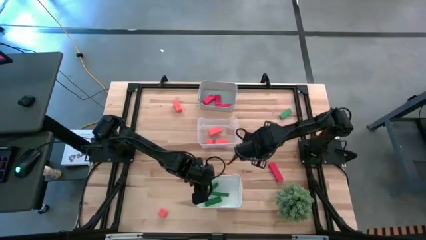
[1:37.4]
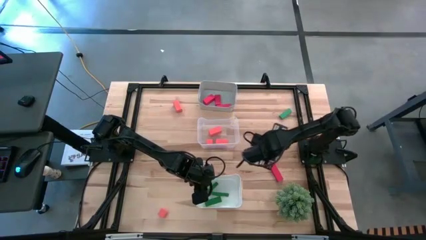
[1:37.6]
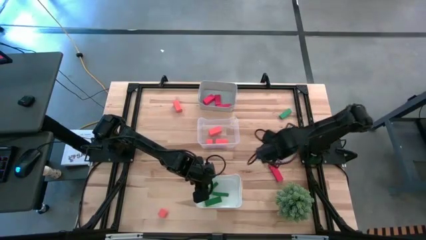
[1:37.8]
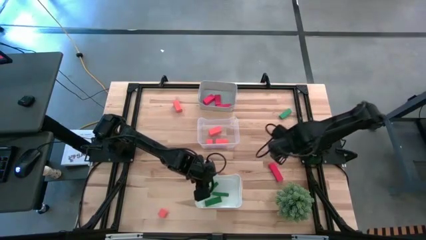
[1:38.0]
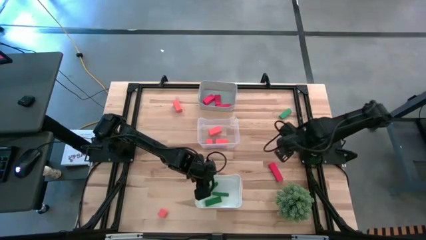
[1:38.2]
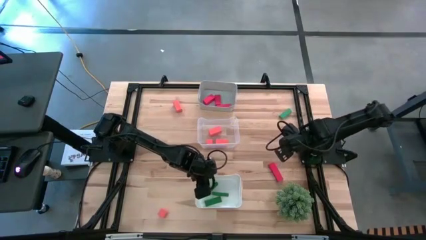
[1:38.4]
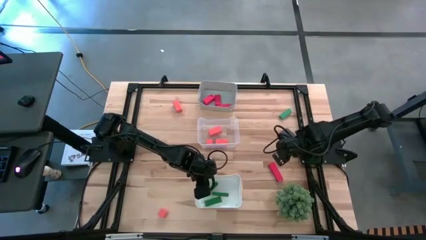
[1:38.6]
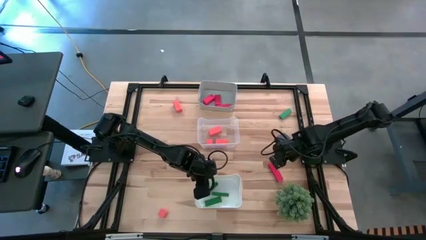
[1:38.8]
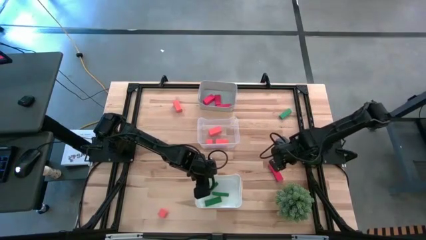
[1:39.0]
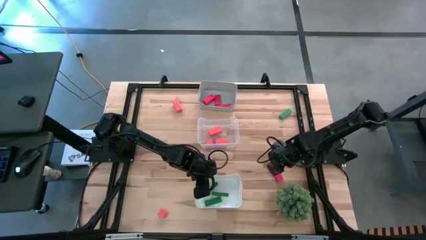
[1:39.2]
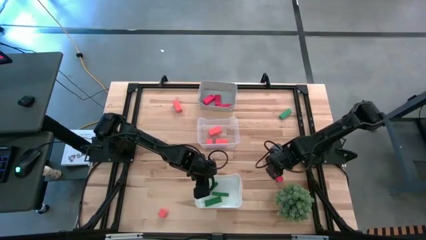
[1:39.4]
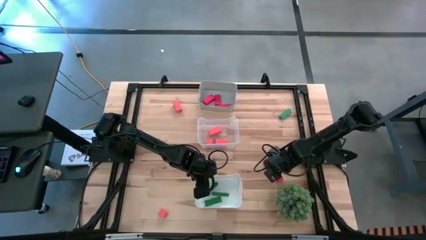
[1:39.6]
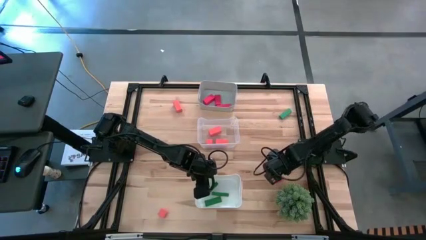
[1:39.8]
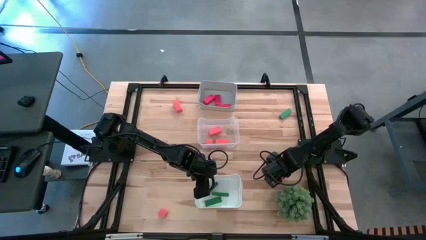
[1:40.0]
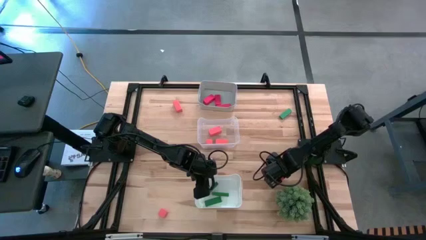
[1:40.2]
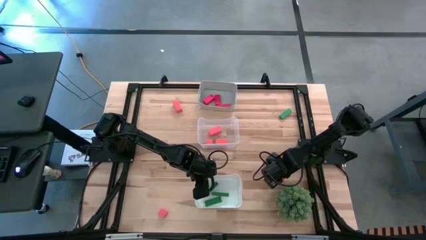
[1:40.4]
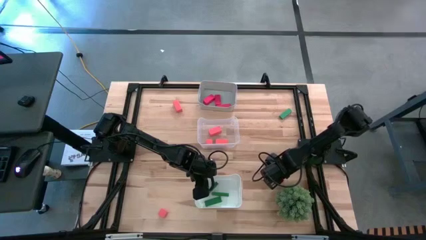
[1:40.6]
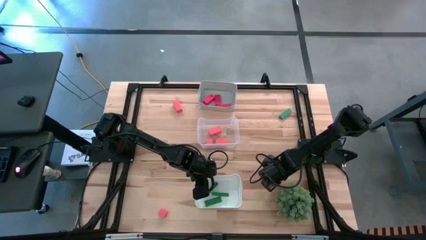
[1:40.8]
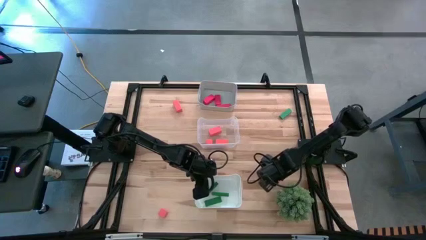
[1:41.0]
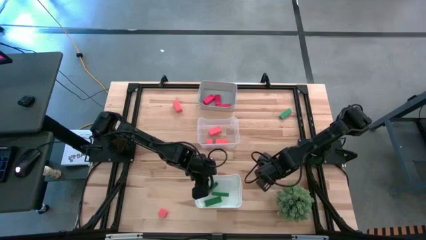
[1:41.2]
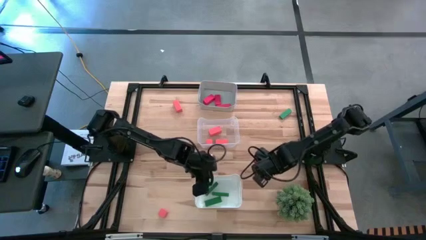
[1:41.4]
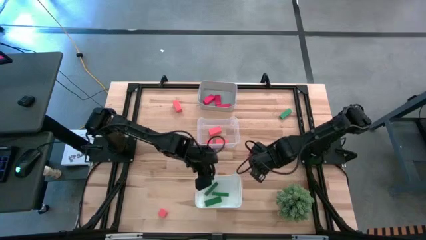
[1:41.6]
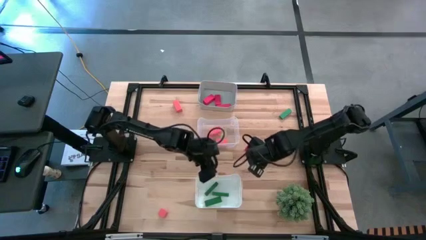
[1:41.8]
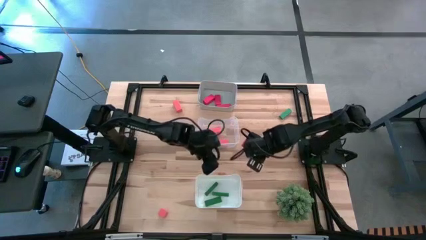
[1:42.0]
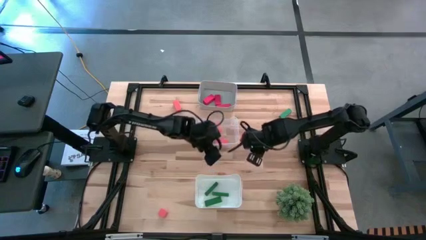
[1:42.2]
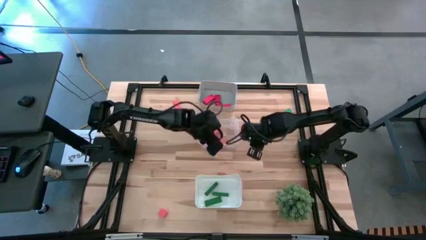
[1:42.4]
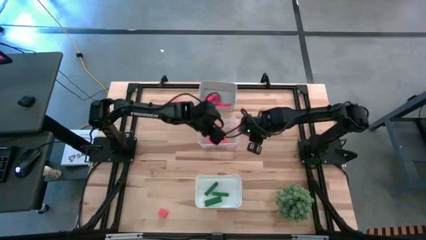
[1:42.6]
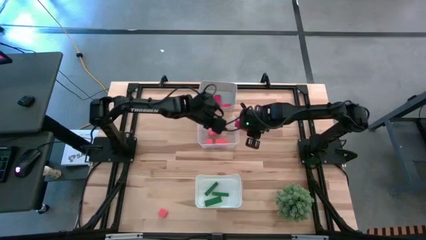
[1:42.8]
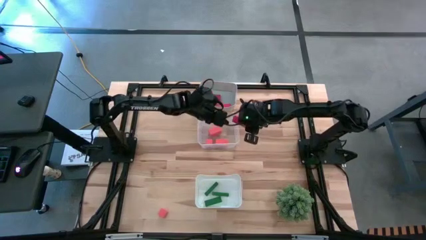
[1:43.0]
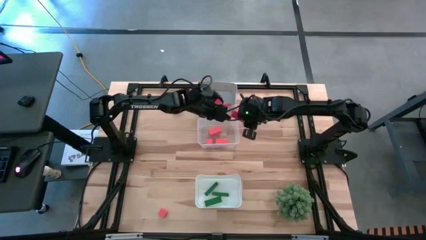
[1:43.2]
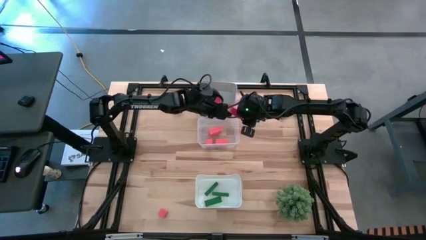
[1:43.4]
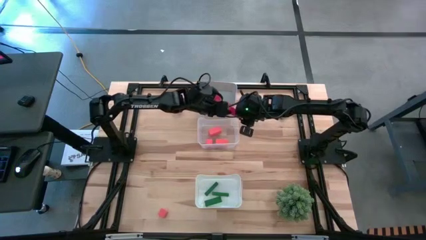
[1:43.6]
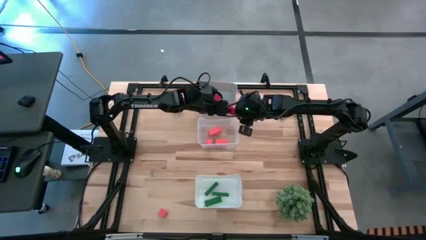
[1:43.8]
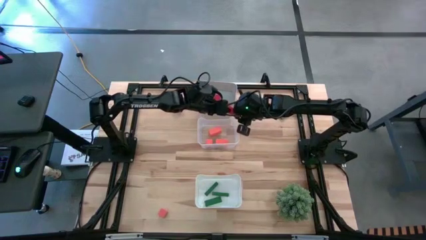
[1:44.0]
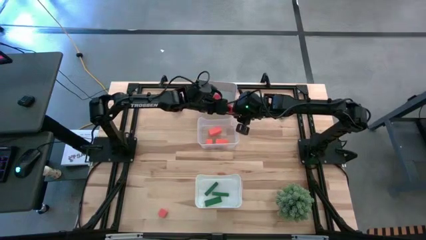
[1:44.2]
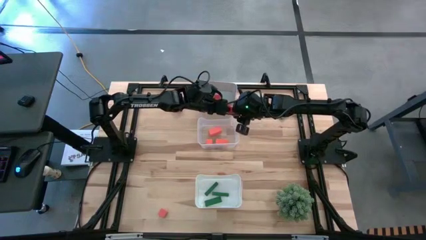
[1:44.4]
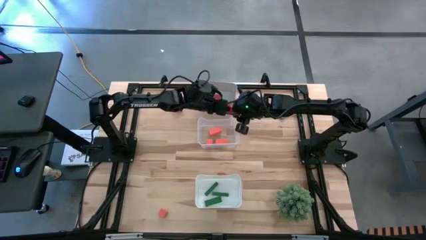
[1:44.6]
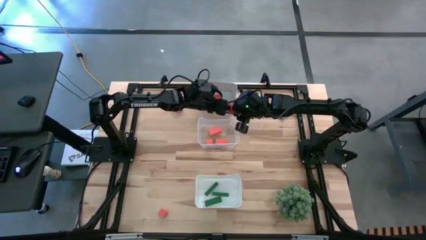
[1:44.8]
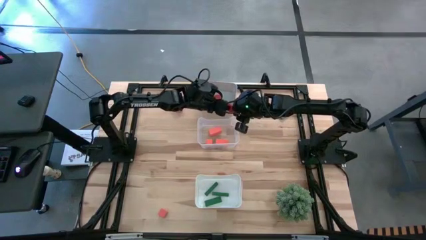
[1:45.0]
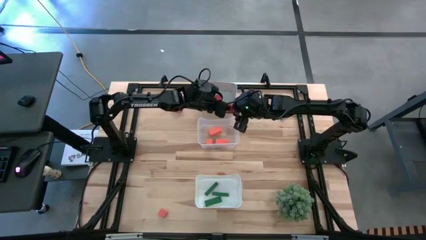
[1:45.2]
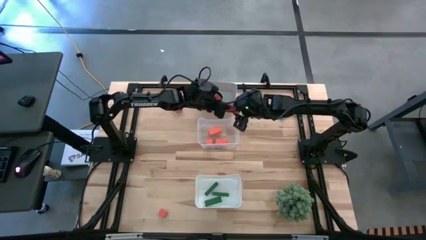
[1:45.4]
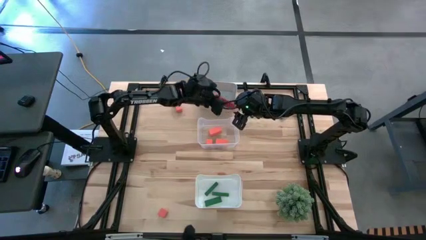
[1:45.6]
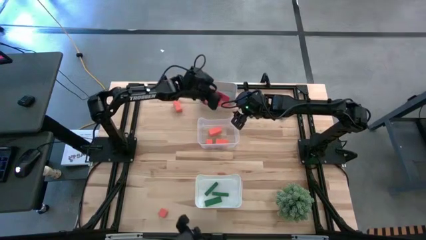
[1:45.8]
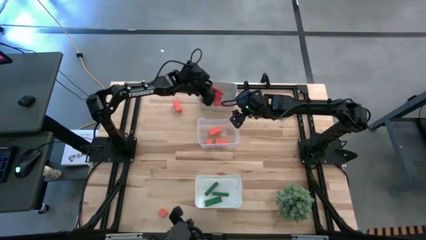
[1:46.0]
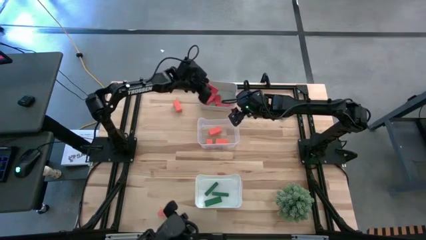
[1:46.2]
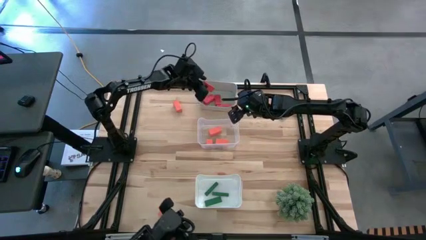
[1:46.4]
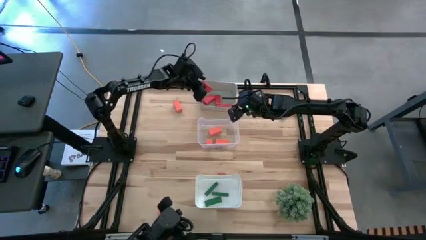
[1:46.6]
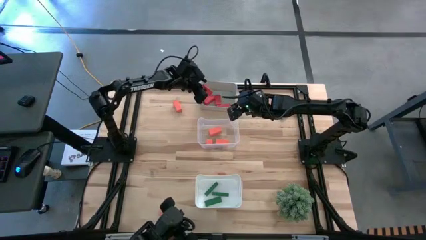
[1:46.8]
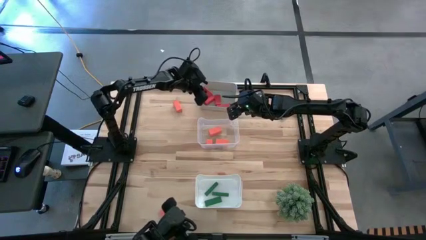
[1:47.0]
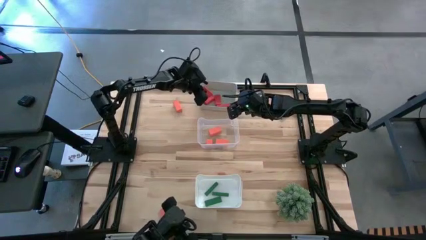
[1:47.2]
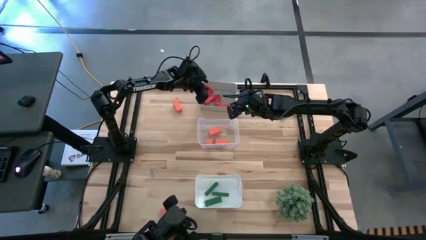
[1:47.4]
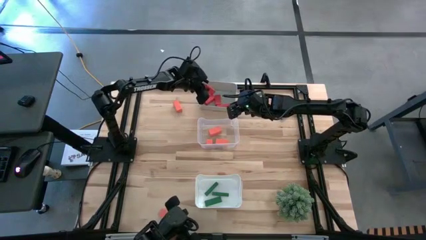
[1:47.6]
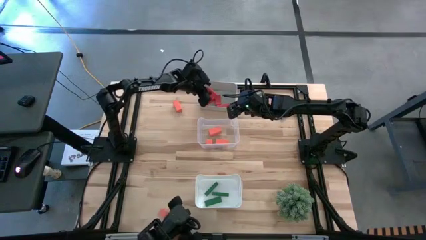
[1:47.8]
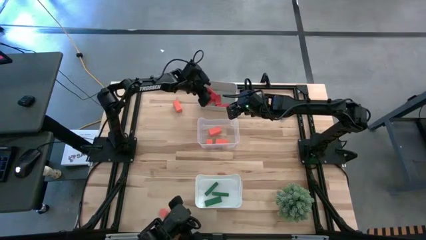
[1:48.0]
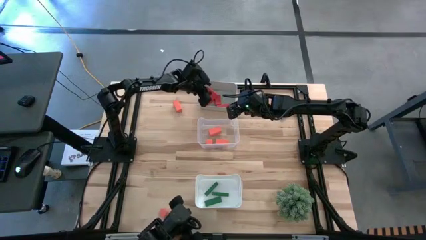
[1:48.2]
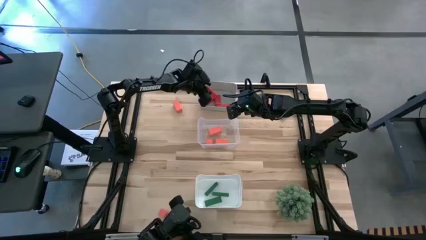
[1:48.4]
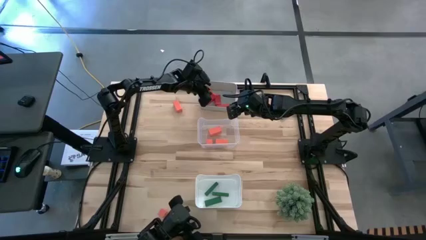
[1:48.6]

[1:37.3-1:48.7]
Task: Sort & place blocks by color
Put the red block into the gray bin
